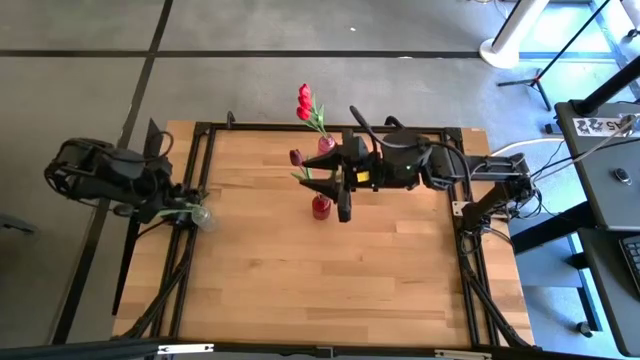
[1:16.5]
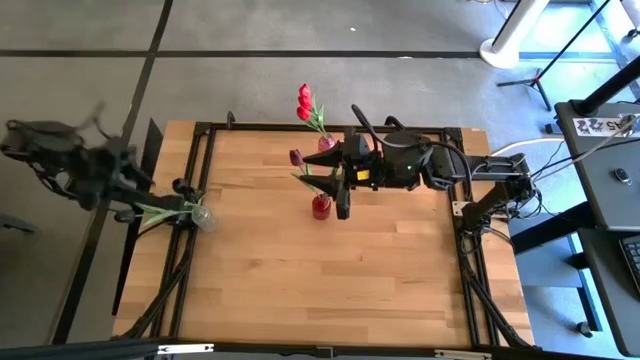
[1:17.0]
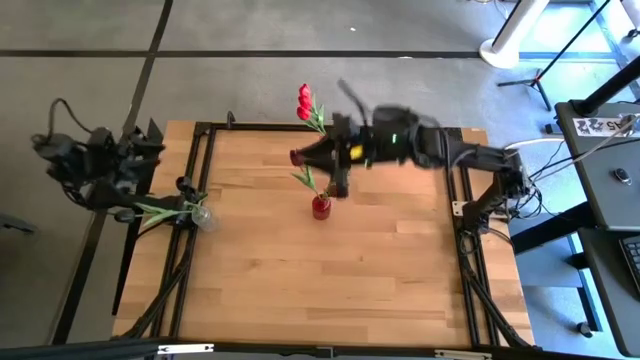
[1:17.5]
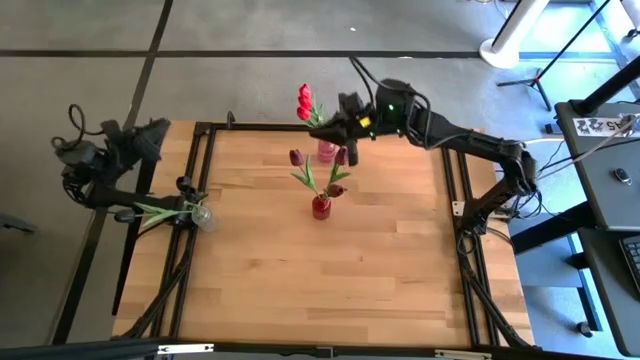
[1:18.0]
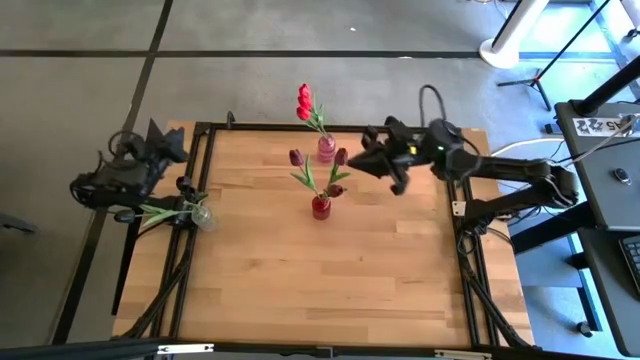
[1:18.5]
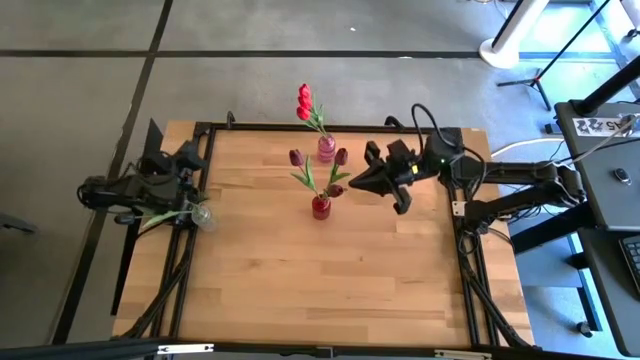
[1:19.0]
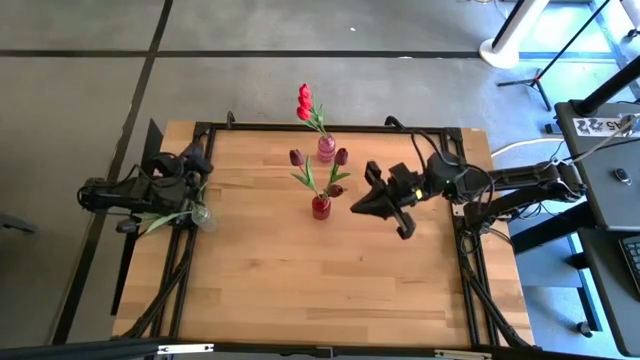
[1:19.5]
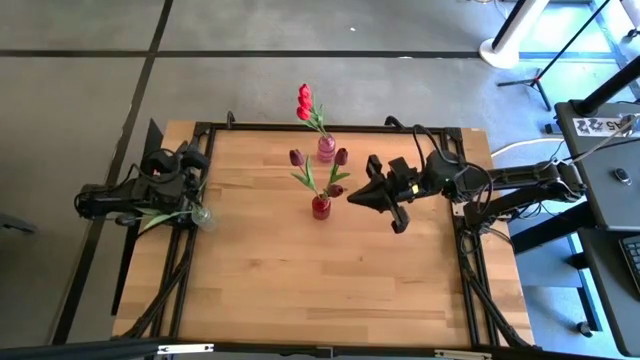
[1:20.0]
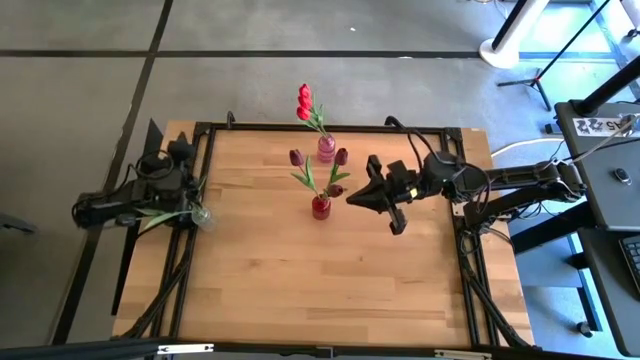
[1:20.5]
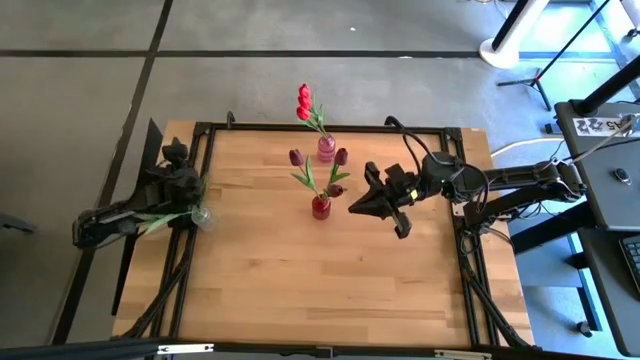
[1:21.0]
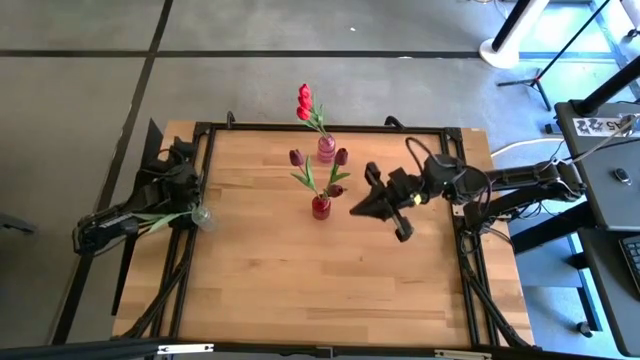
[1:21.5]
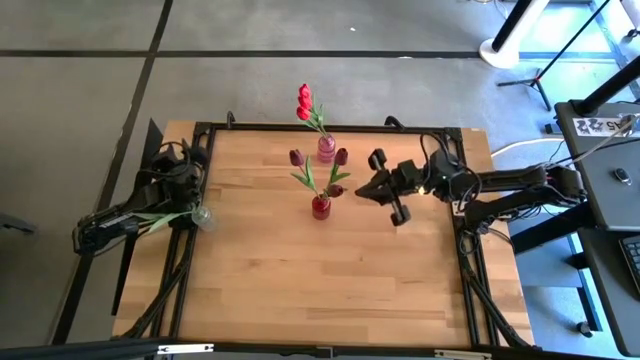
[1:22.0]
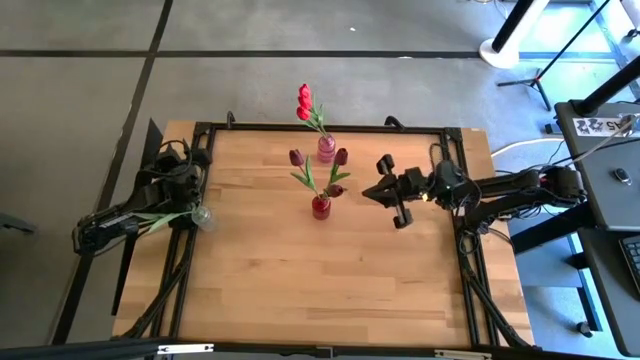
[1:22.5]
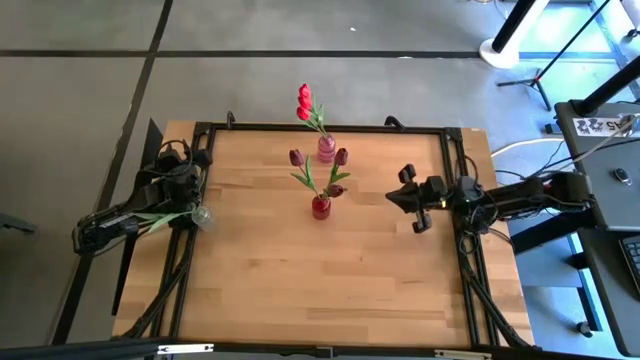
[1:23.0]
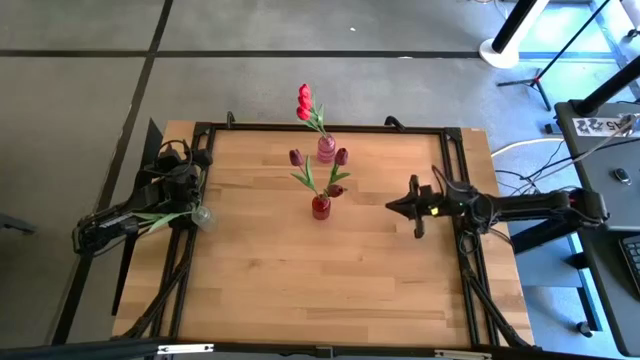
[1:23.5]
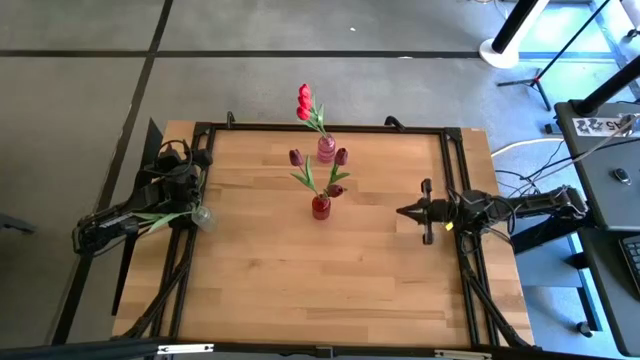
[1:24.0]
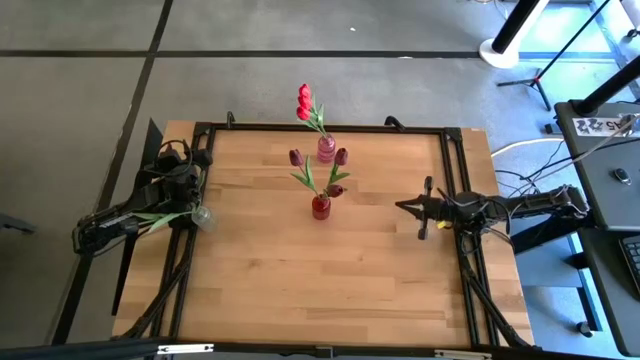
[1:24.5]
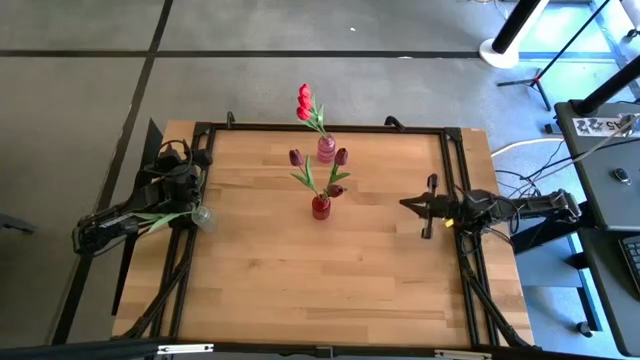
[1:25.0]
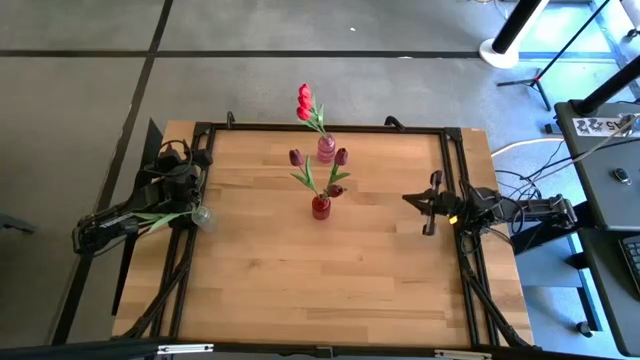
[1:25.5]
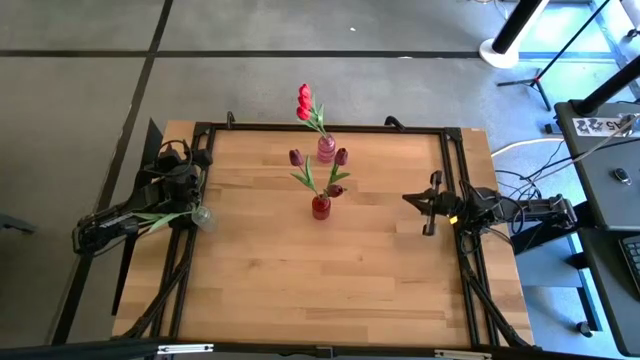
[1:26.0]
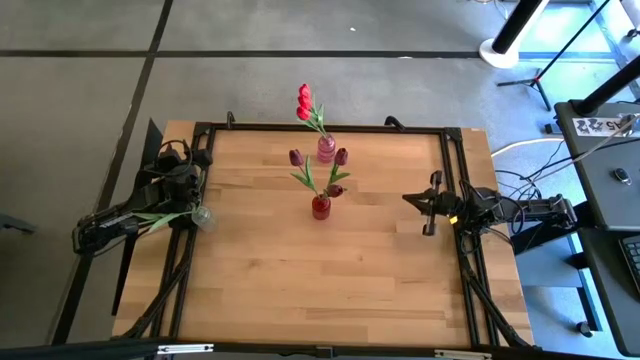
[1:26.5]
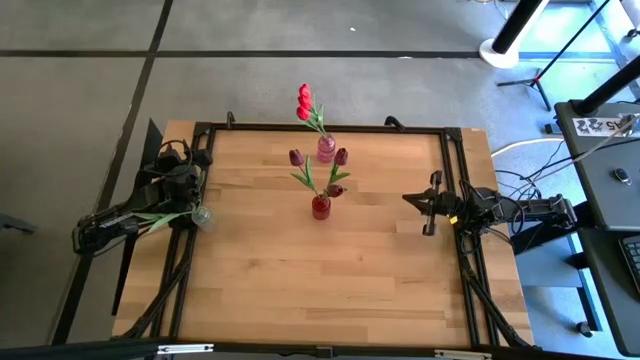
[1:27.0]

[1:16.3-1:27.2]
Task: Sort flowers into vase by color
Return to Home Position

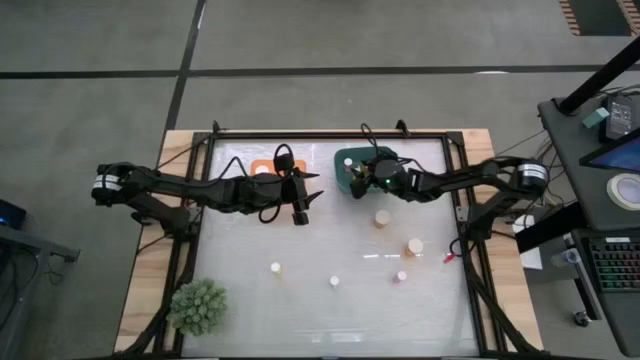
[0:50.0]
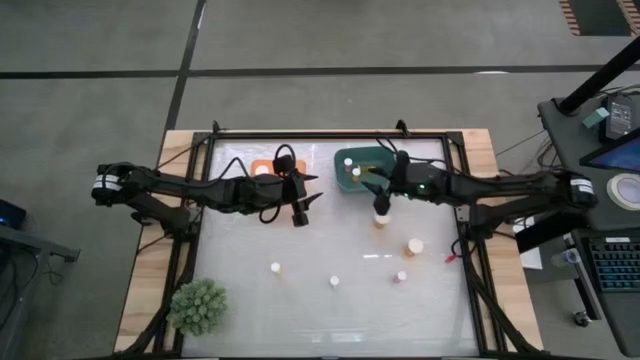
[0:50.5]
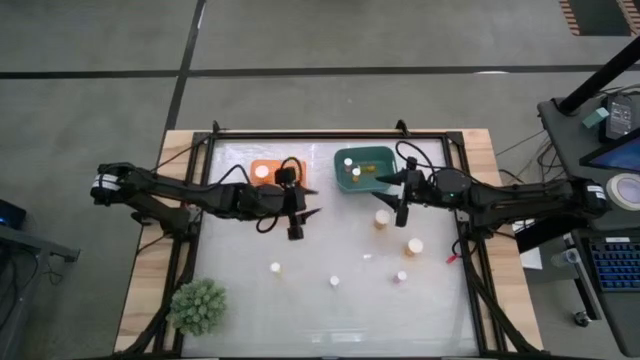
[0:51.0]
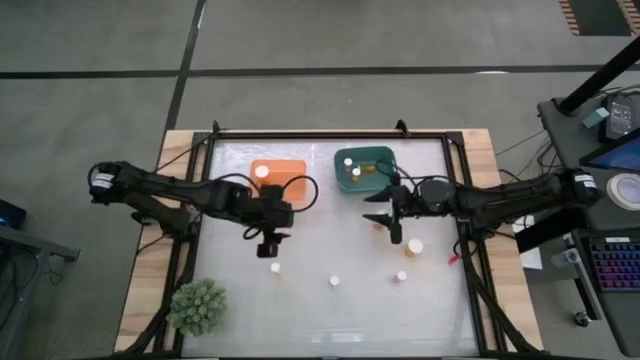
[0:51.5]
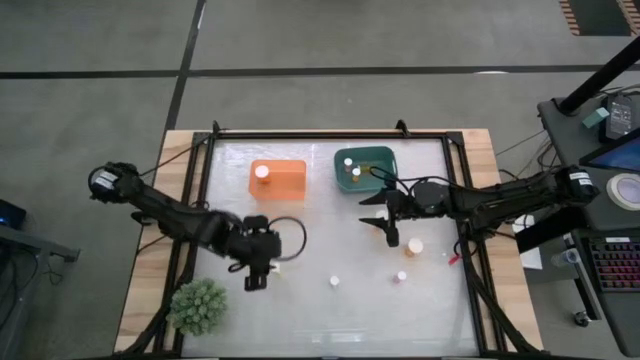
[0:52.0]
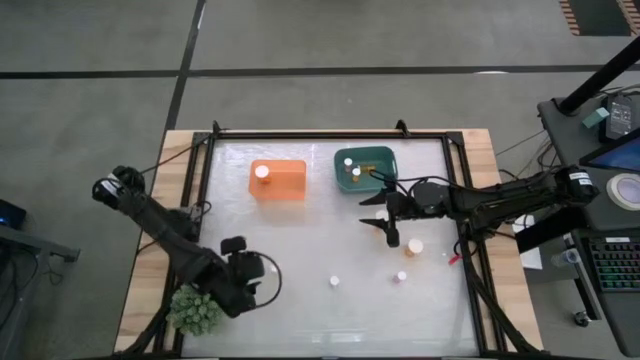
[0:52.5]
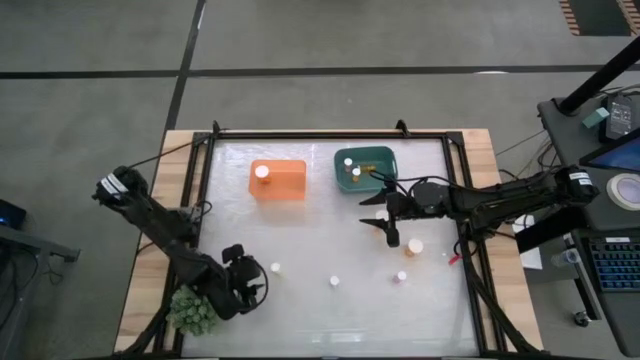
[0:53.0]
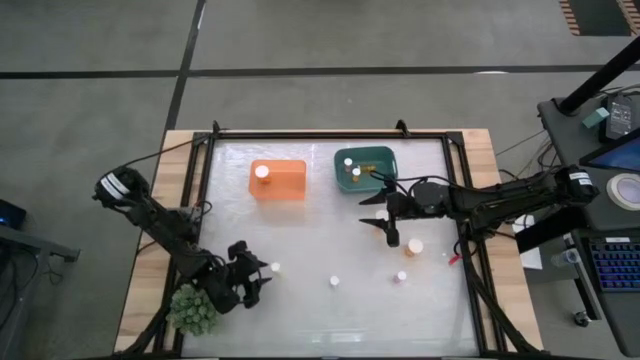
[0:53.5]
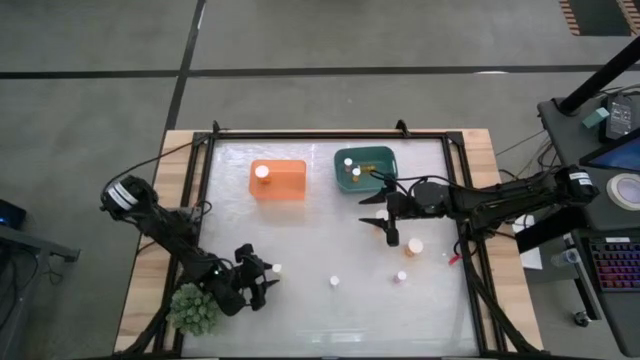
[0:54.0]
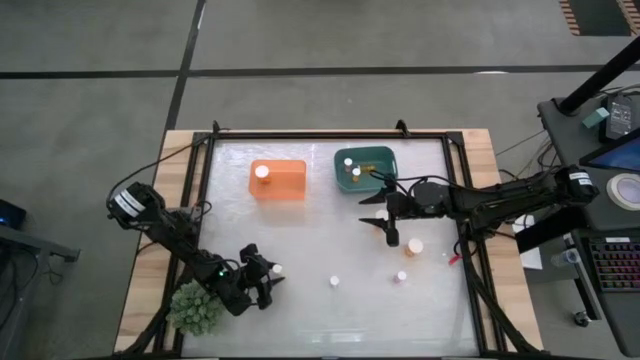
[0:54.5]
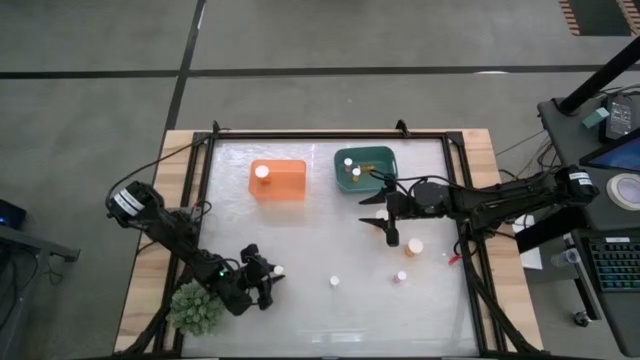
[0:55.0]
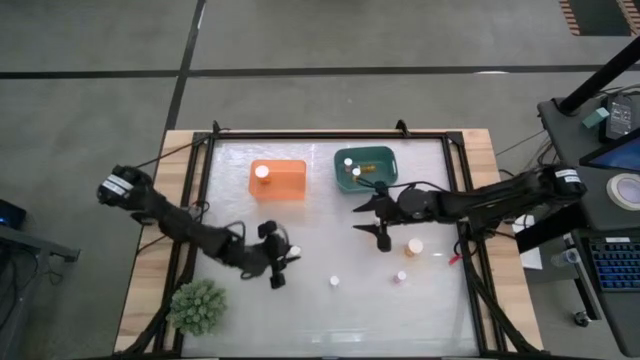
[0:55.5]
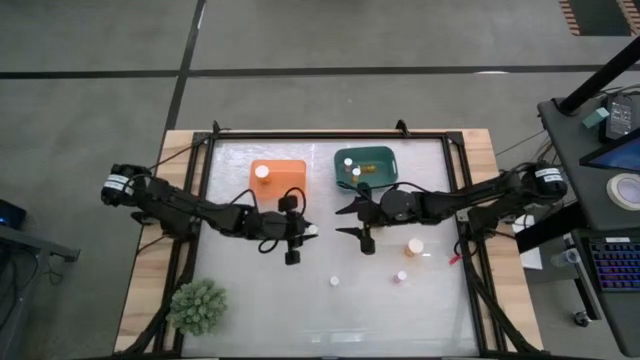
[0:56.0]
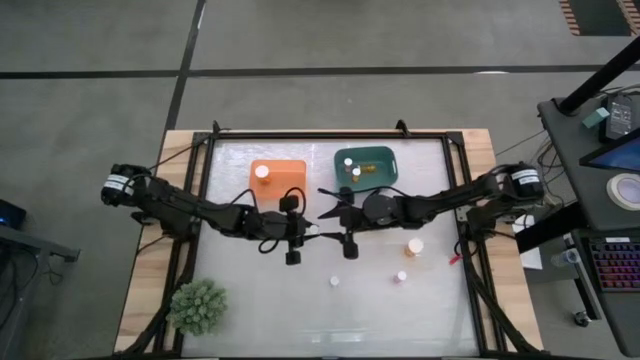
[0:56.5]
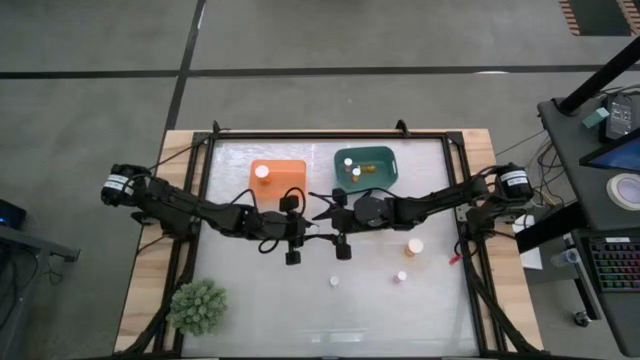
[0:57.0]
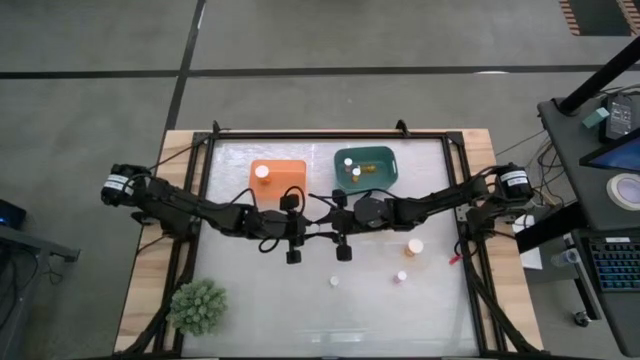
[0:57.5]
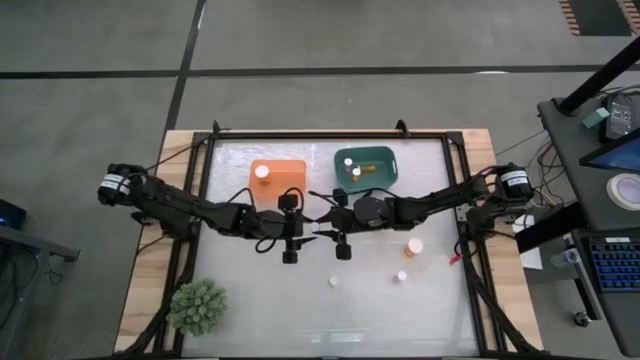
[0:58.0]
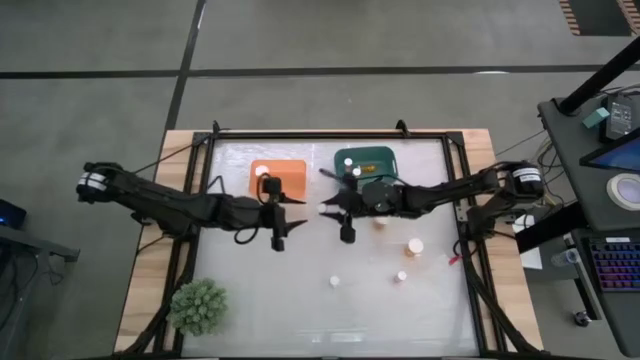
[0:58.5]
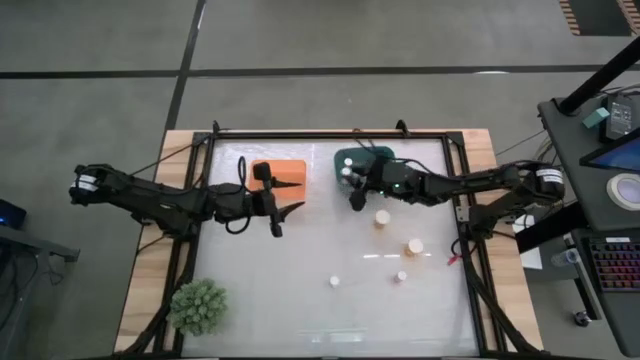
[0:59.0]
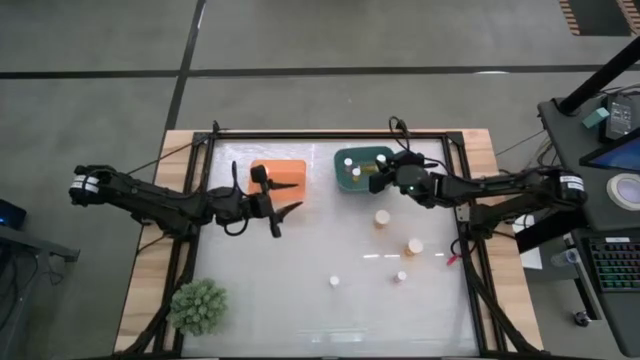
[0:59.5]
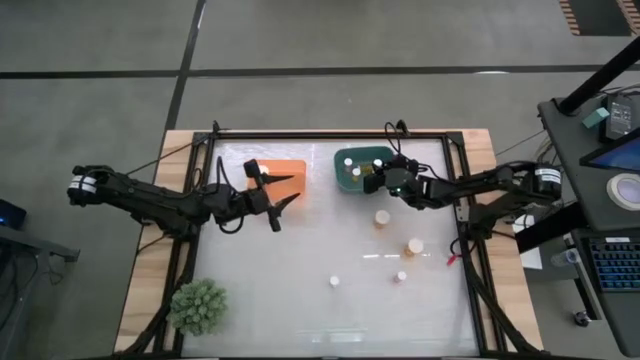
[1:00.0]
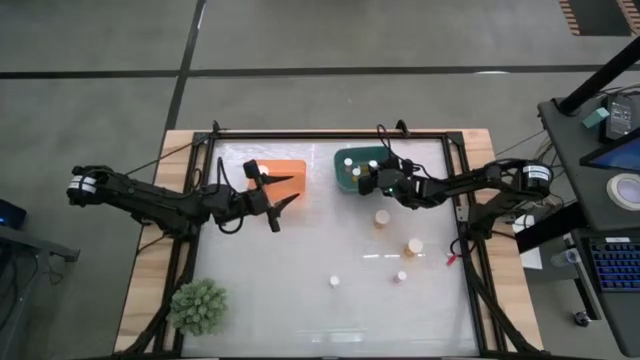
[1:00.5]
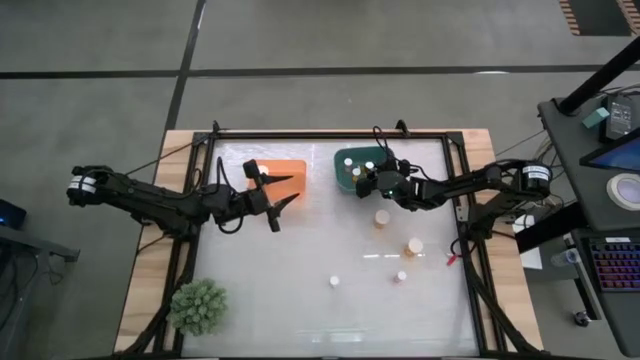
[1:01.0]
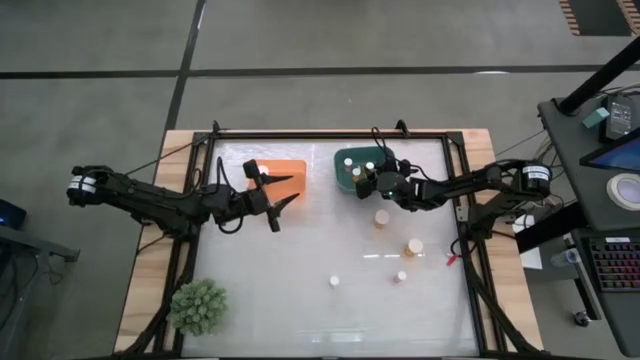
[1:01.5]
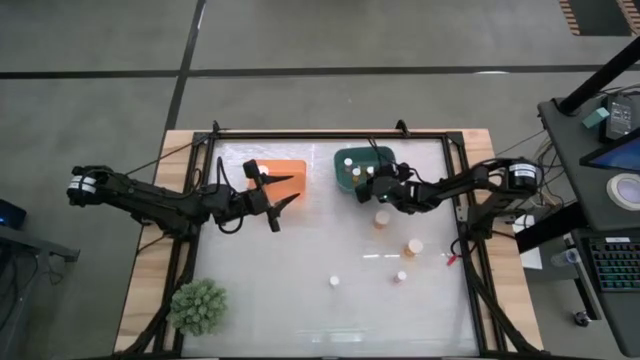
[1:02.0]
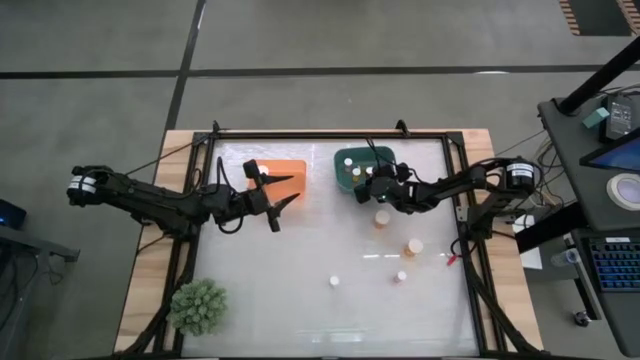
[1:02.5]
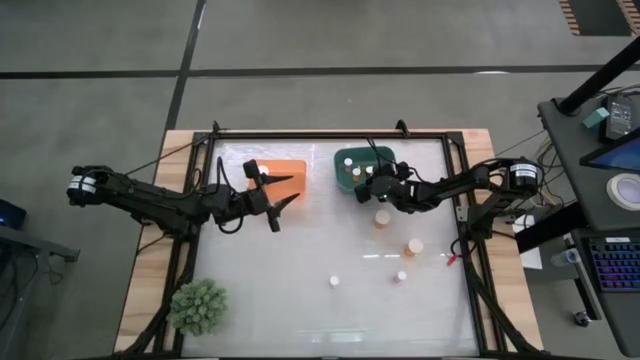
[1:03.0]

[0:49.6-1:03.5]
Task: Pick and place medicine bottles into bin by pill shape (circle, oval)
Put the left yellow pill bottle into the green bin
